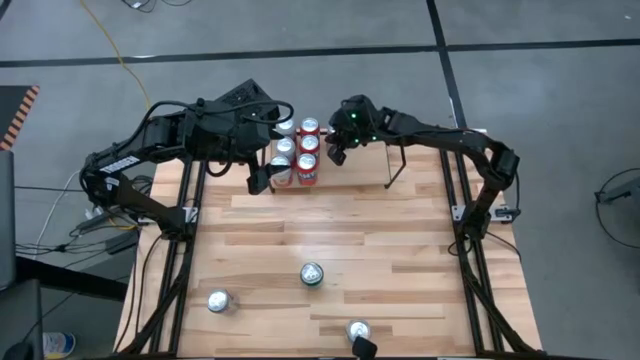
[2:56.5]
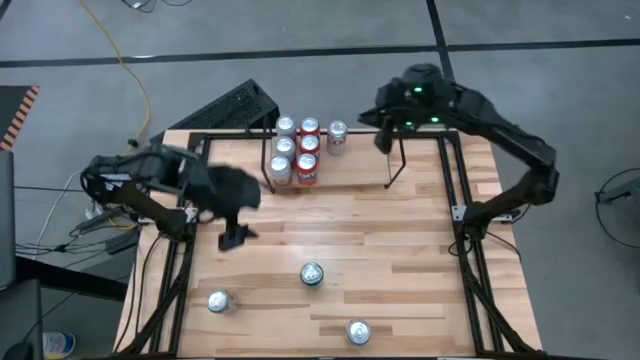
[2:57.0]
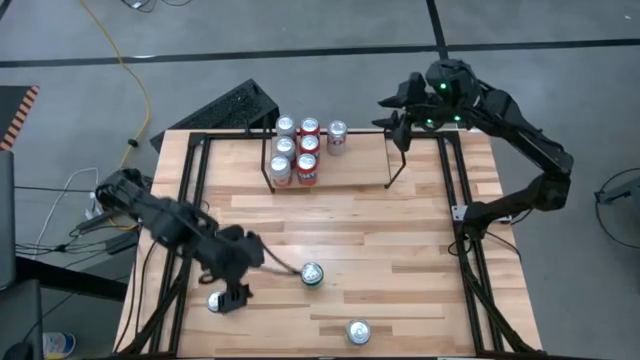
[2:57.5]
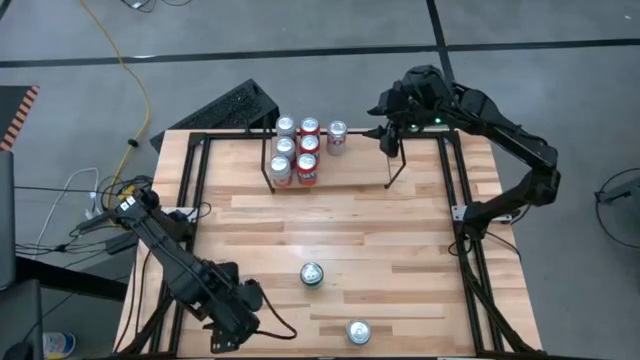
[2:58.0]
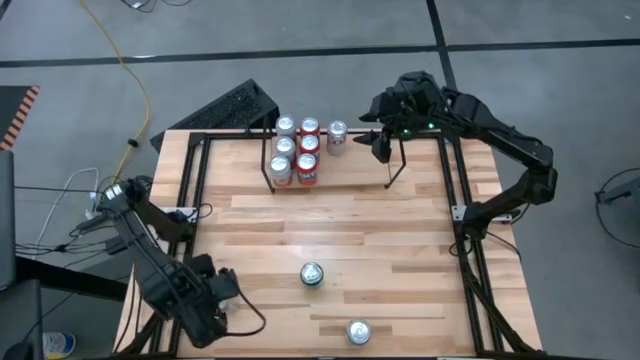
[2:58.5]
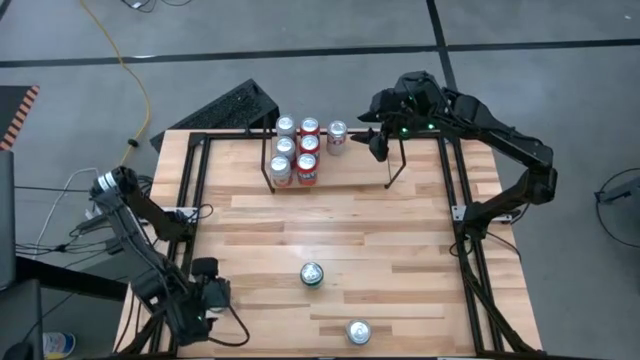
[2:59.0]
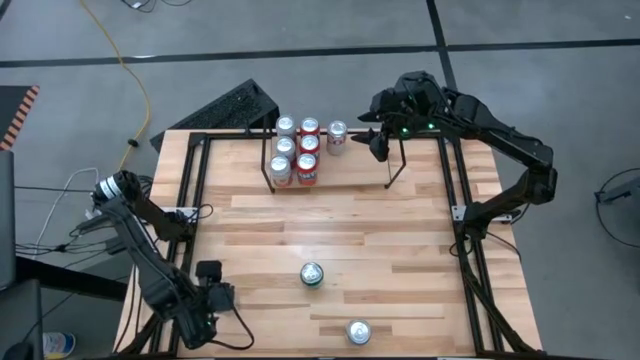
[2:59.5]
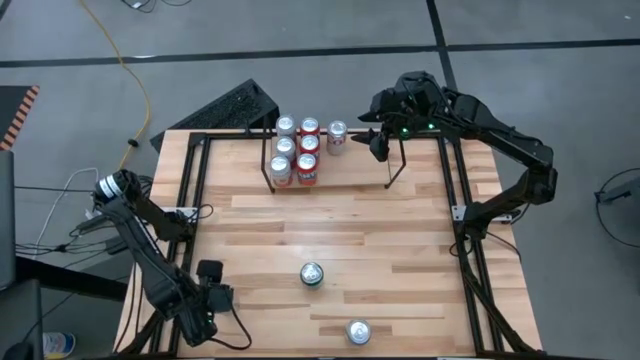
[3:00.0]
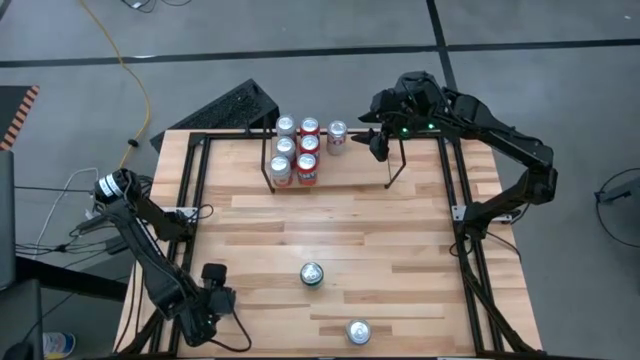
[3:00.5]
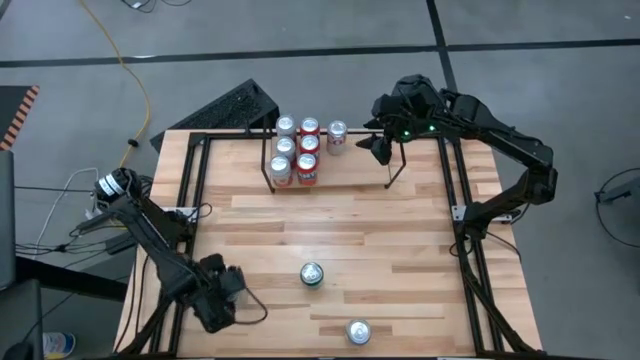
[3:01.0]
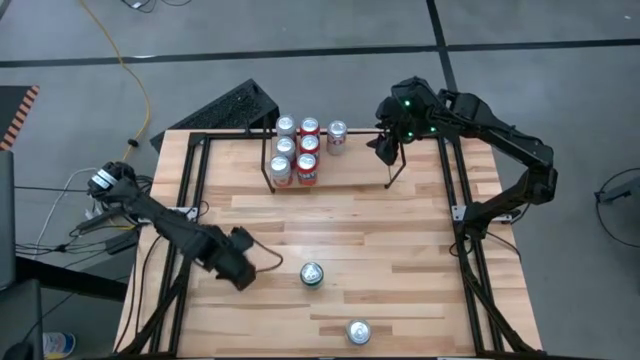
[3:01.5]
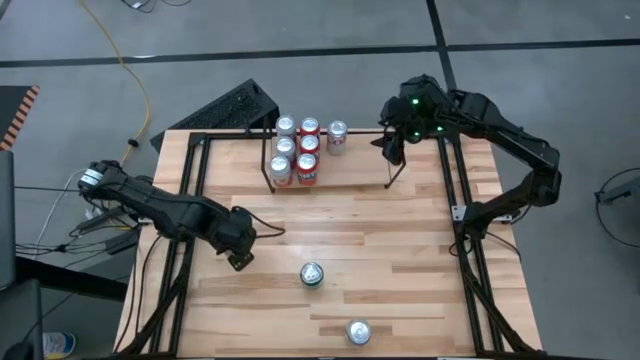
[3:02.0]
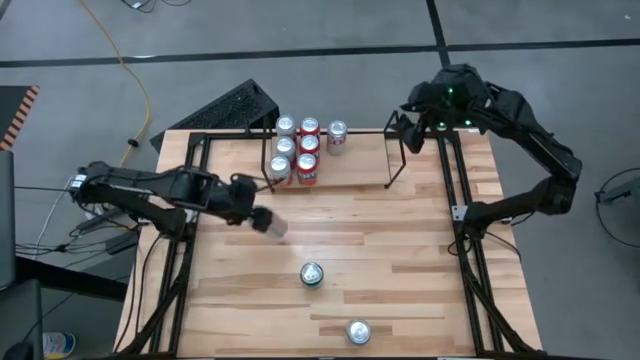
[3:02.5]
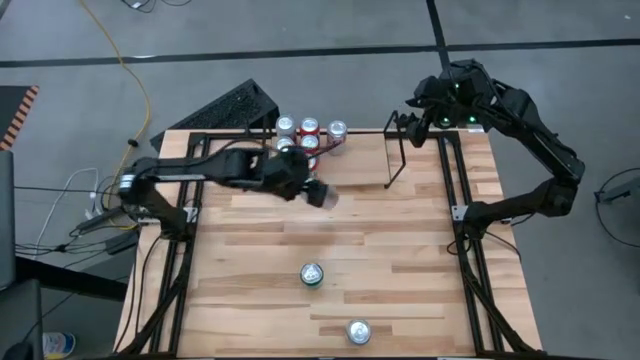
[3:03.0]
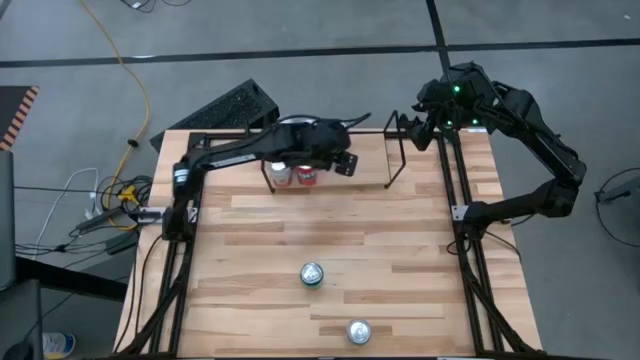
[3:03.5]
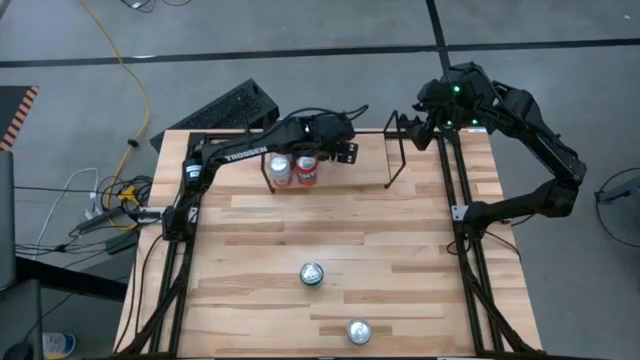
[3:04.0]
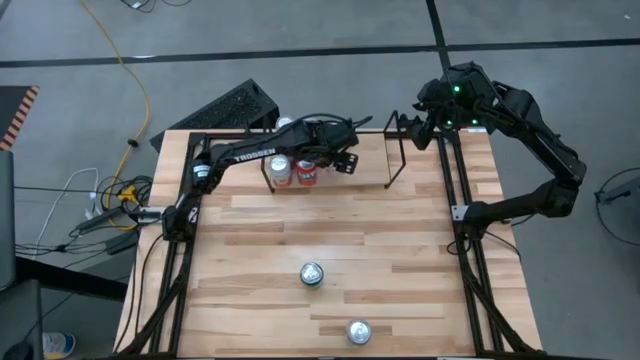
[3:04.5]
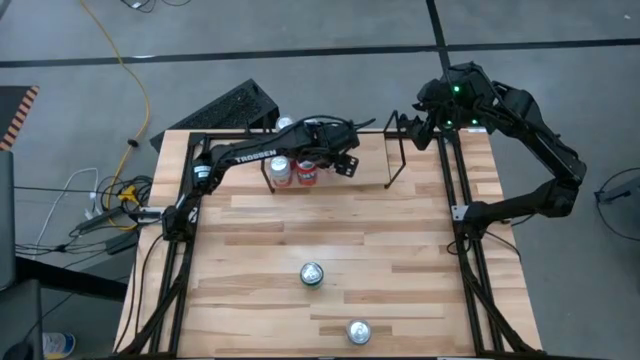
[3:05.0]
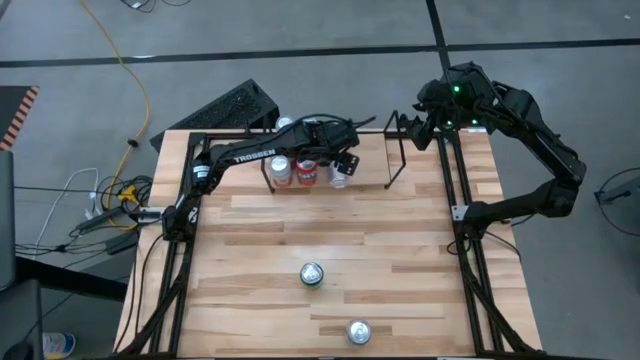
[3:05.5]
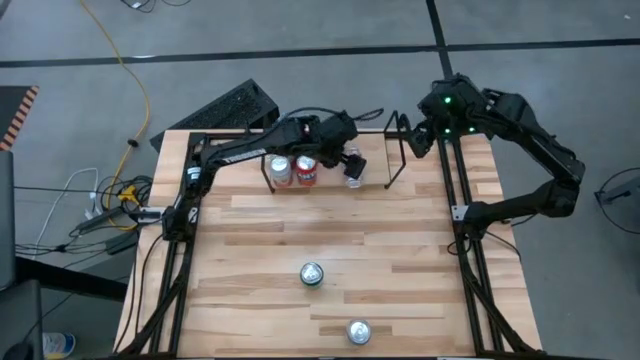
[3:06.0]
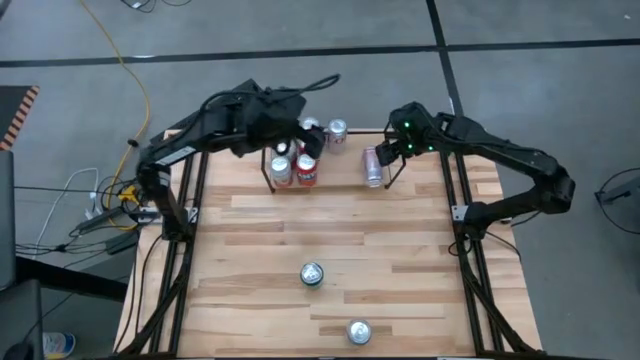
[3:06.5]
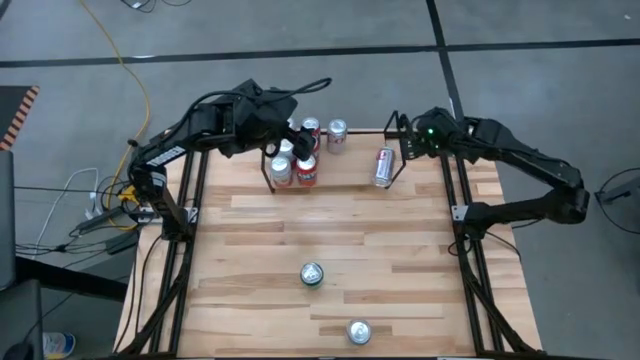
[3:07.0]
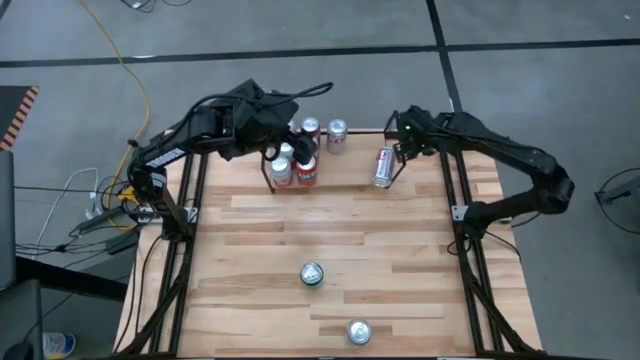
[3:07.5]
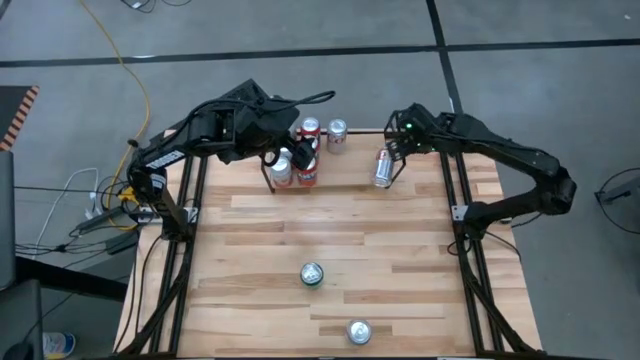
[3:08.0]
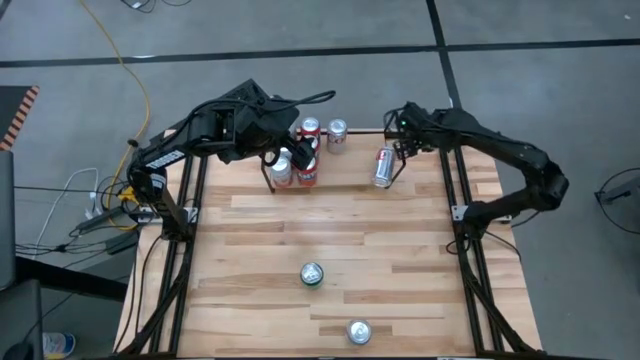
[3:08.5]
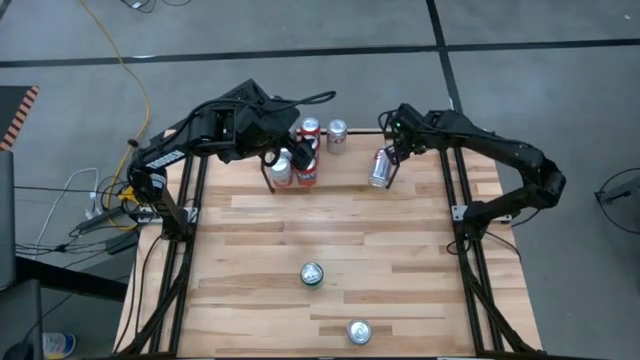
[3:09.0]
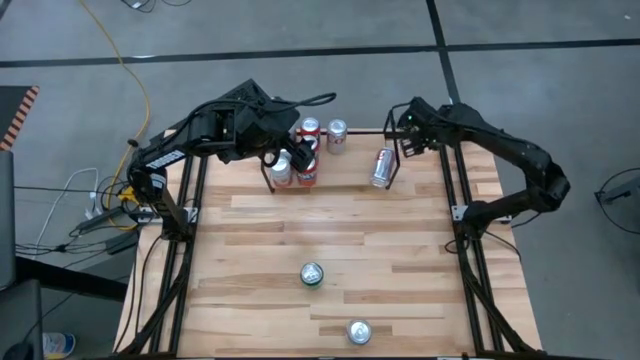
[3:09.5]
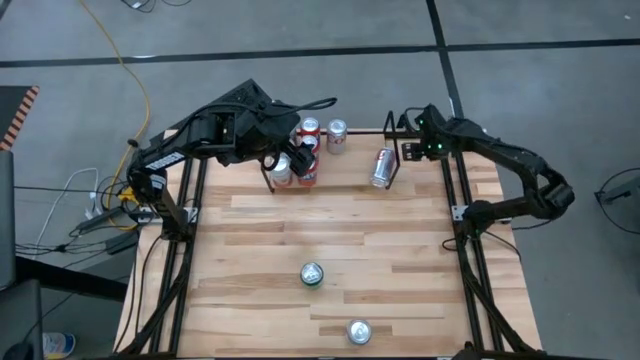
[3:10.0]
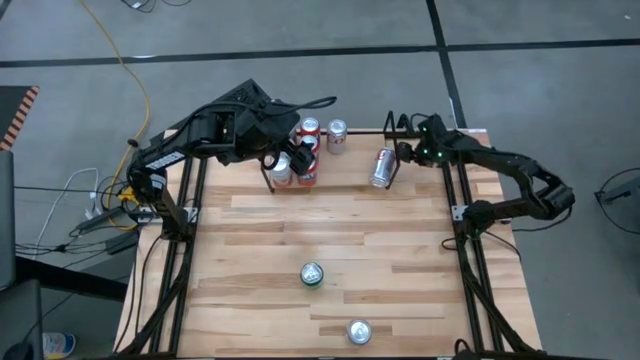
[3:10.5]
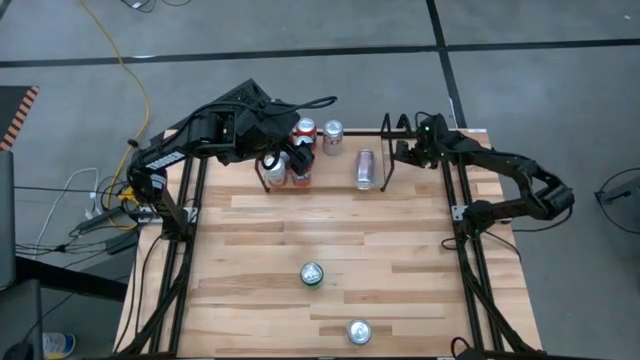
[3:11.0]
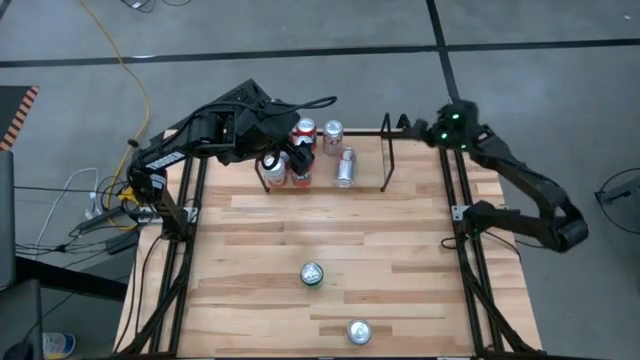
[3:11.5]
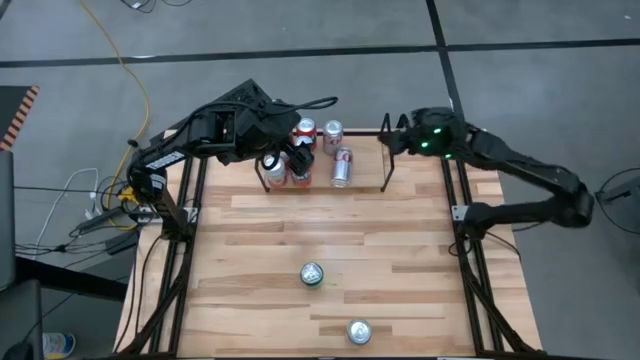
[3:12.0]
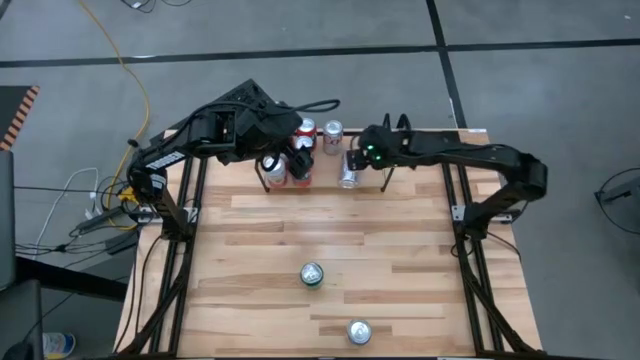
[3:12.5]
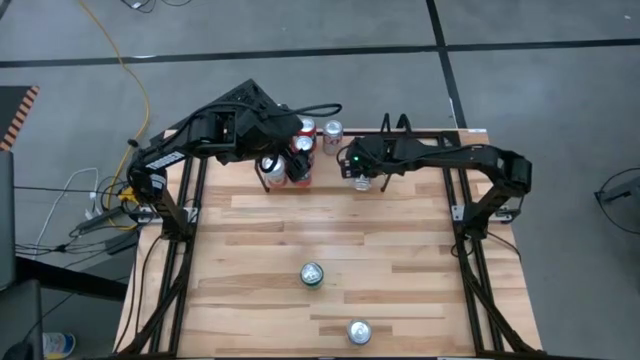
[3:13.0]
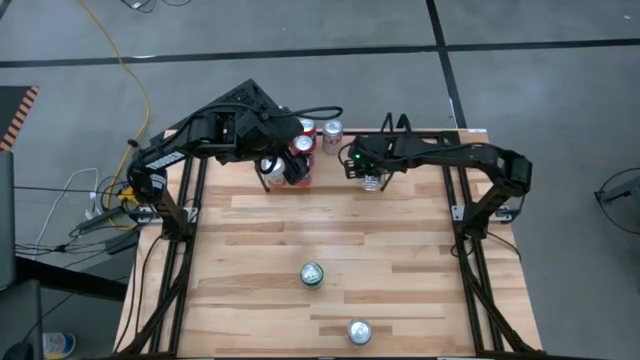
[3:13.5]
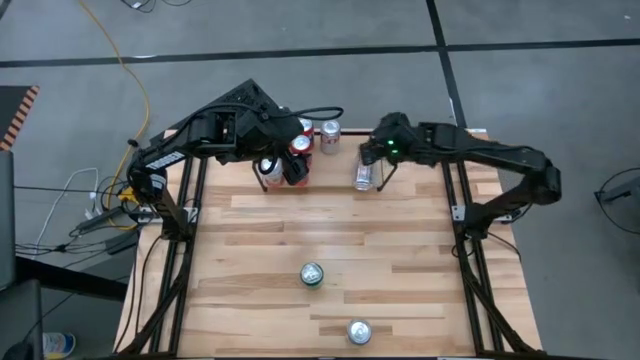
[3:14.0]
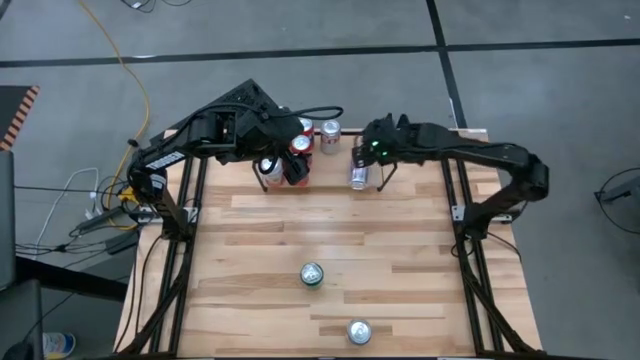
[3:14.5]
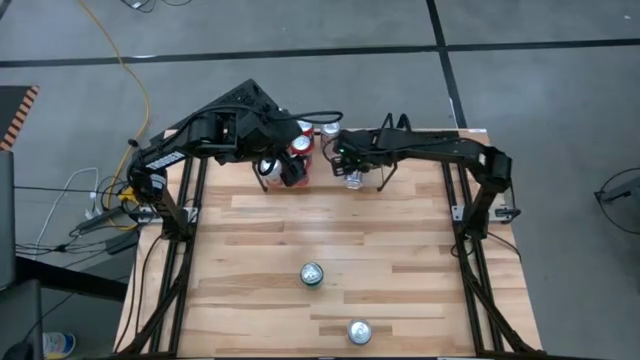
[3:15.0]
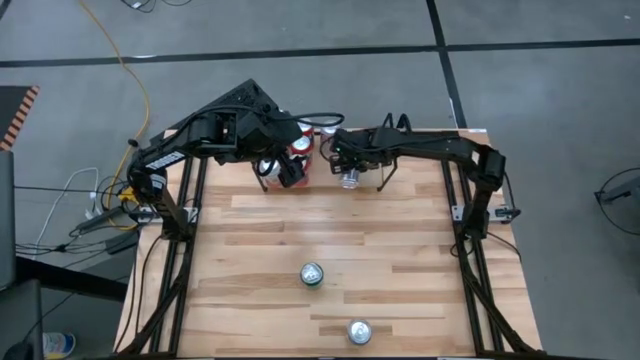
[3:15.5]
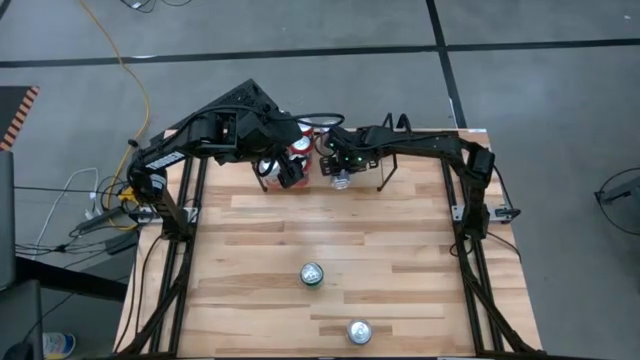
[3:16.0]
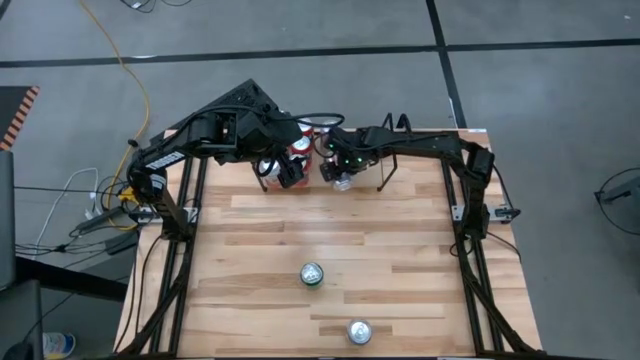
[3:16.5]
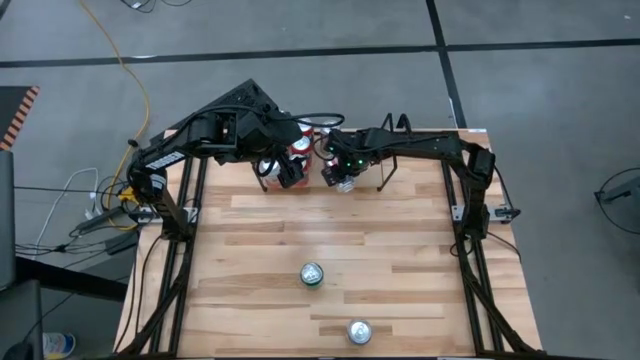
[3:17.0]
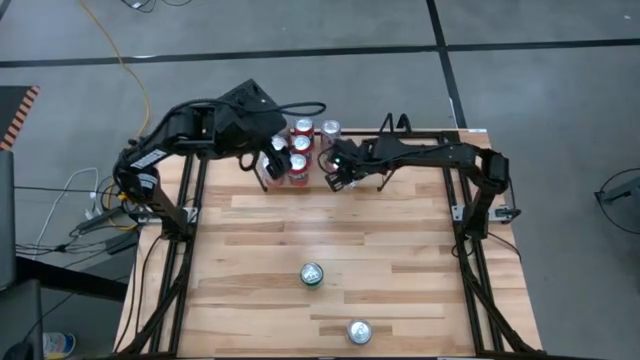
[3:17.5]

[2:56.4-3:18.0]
Task: Place canned beverage on shelf
Put the left silver soda can on the shelf aligned with the other silver soda can
